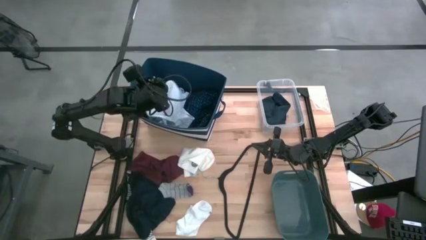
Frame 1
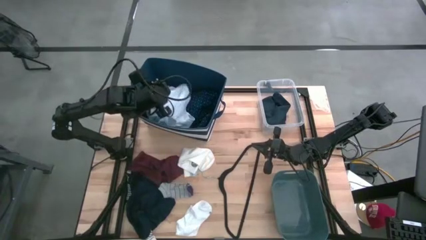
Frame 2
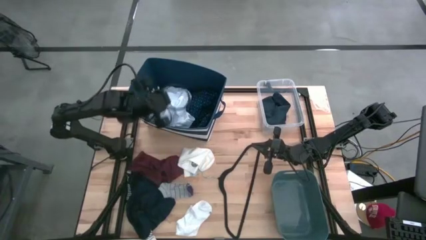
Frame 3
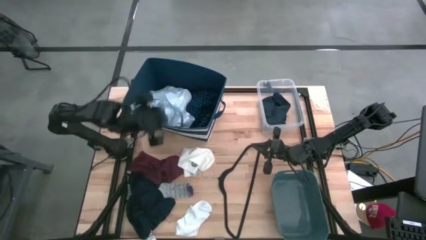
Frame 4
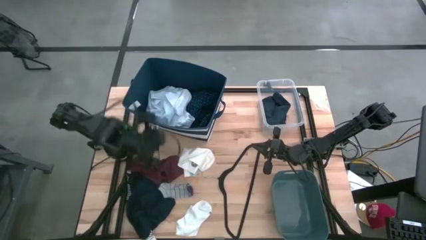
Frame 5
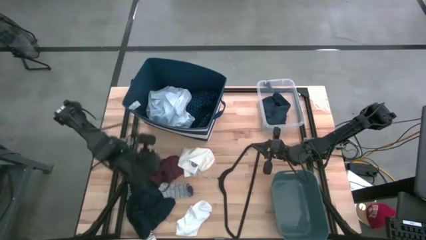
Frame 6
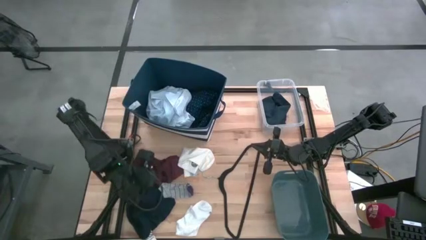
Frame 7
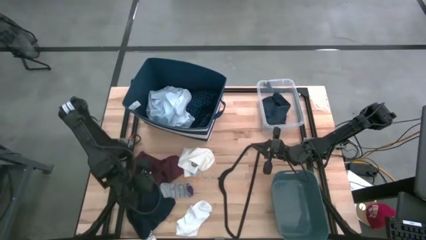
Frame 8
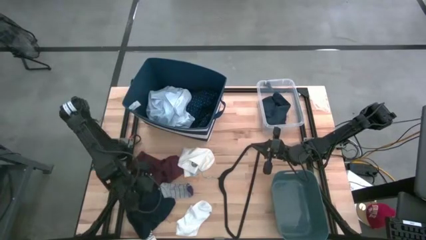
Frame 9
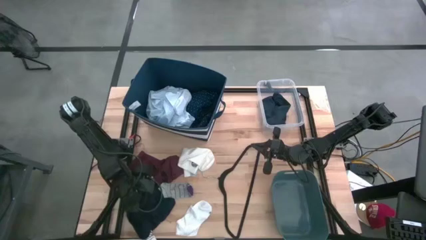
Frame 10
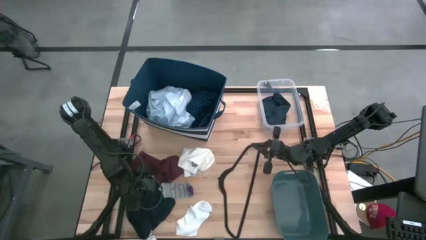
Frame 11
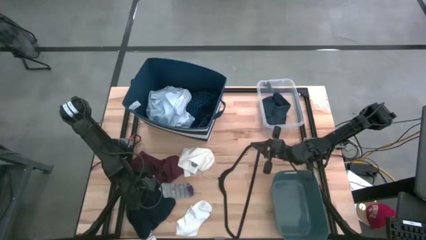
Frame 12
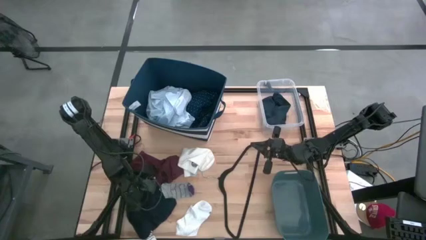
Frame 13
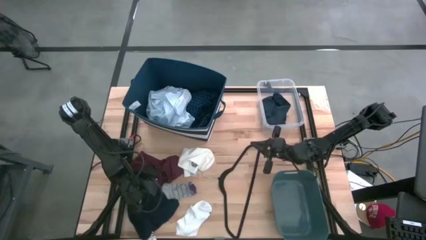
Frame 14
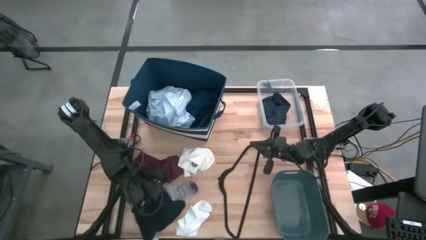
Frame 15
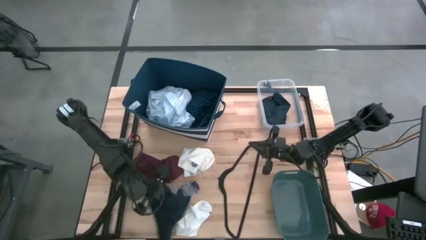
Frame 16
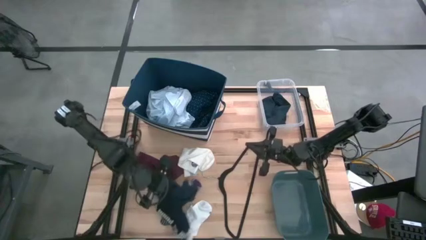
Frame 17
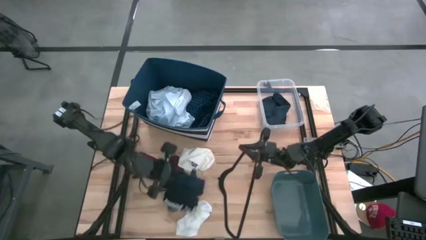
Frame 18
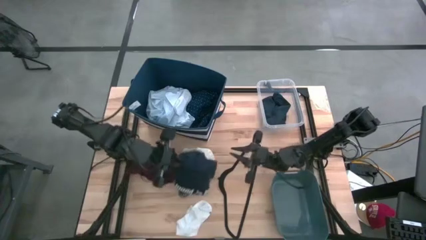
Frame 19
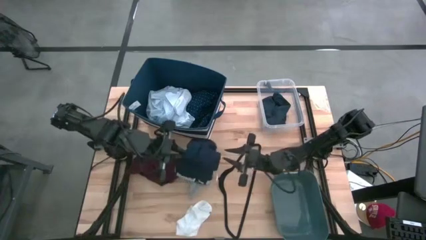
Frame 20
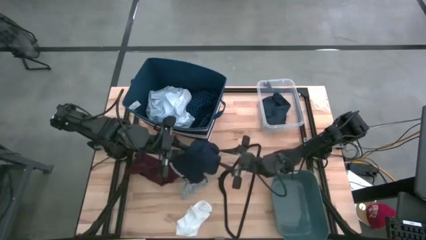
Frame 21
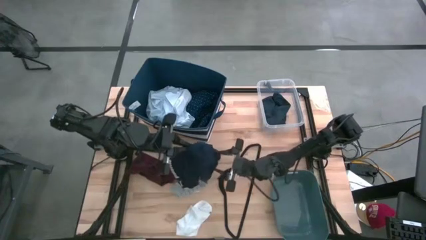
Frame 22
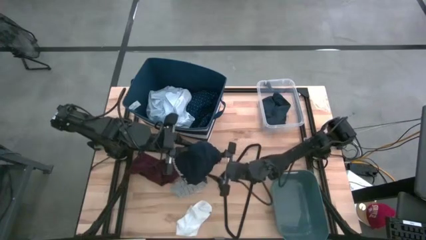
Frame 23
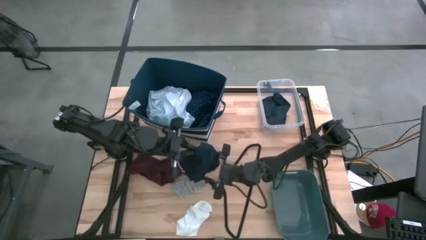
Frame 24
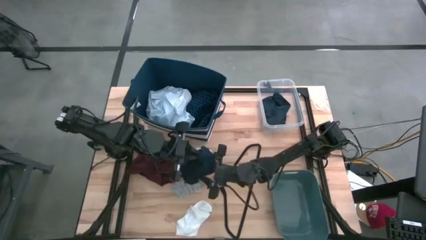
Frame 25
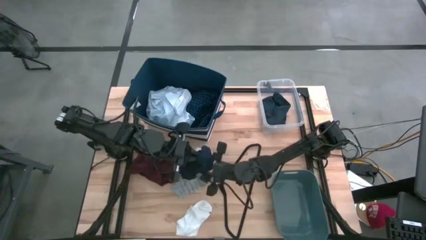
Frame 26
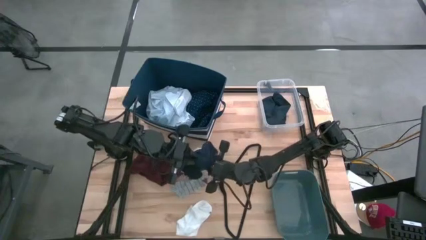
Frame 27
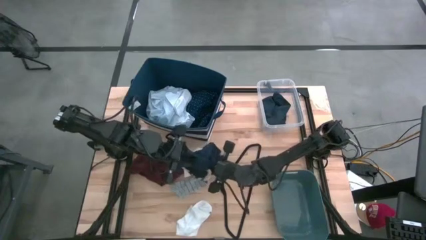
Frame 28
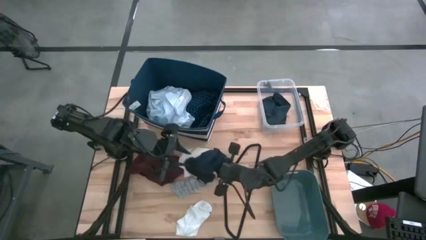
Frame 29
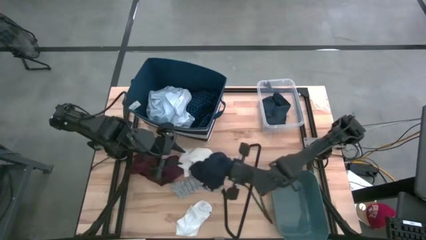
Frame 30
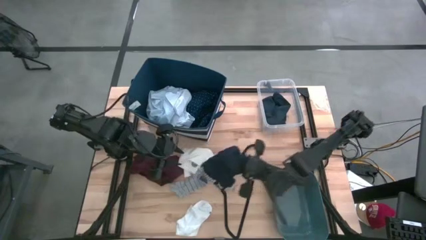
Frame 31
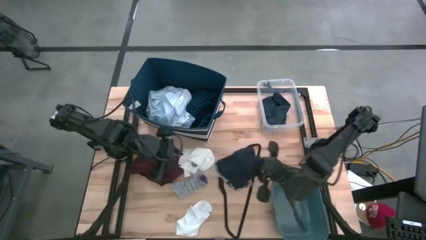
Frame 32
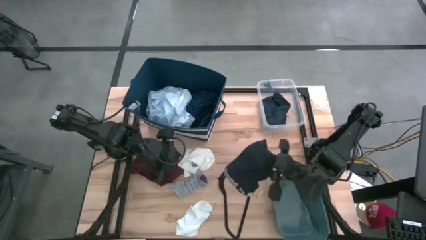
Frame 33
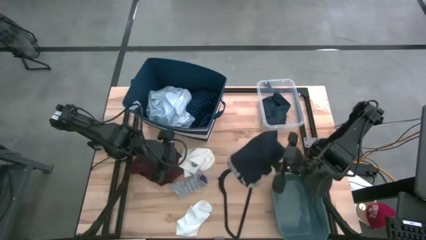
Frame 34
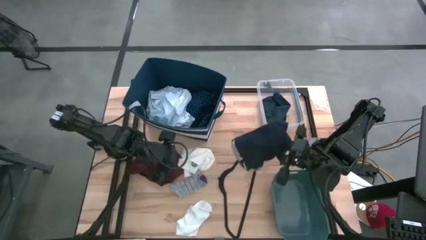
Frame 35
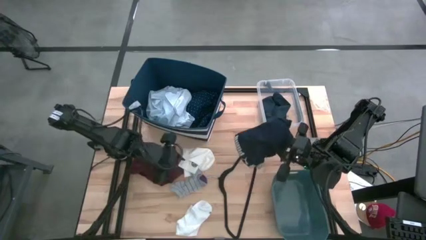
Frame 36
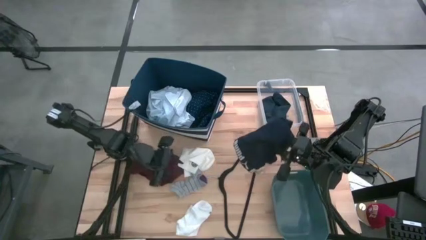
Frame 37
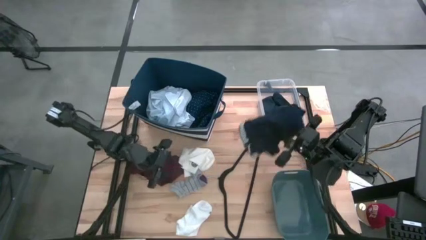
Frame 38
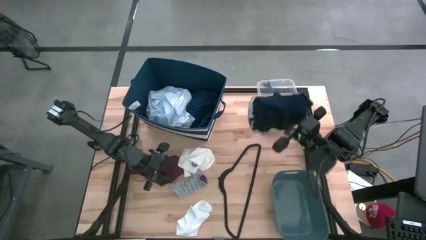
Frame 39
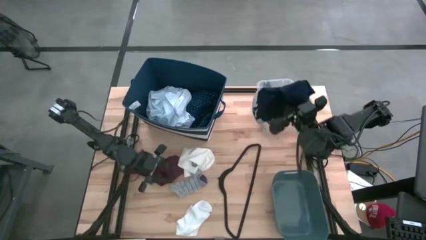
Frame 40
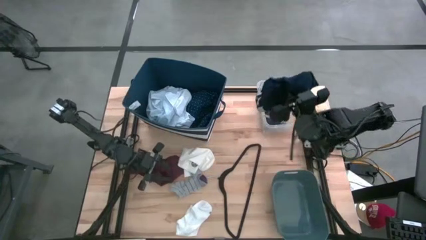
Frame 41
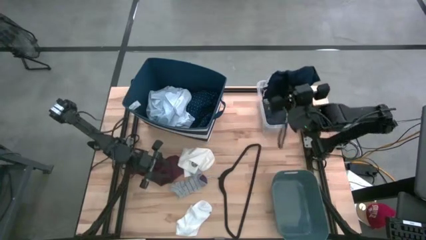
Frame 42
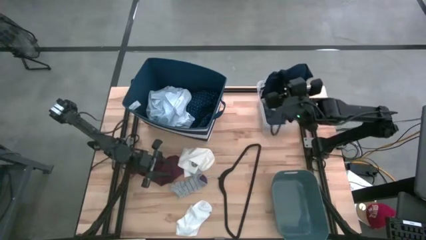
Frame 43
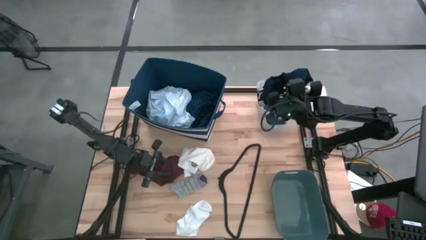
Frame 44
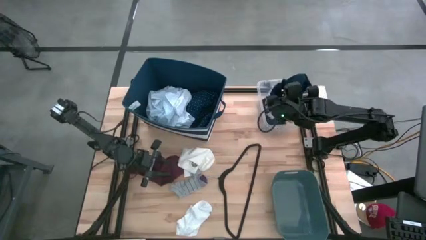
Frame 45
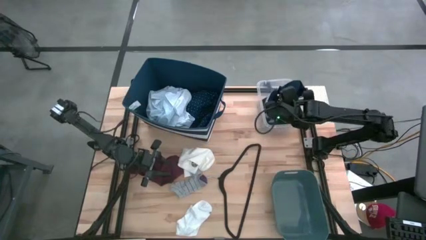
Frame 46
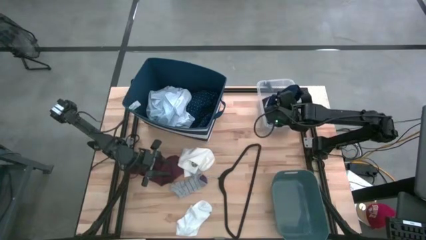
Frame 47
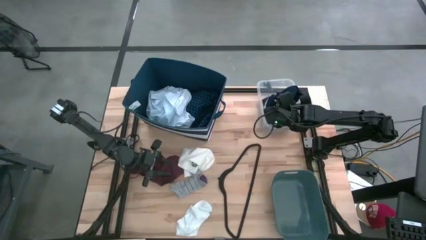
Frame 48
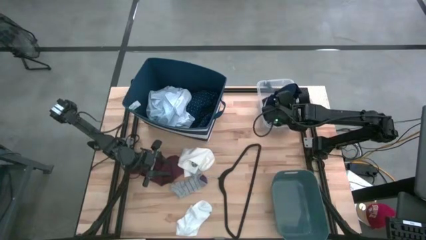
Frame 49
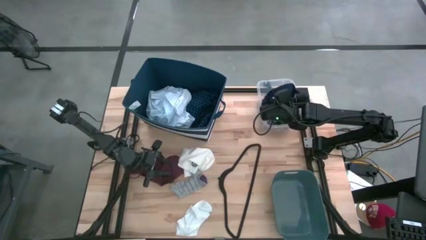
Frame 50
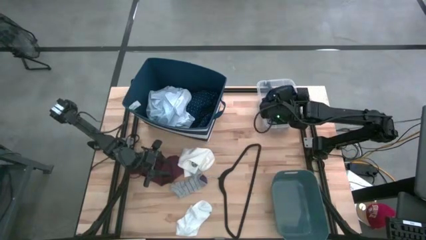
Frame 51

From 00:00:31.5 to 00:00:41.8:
Task: Pick & Place Cloths
Put the black boxer into the transparent bin

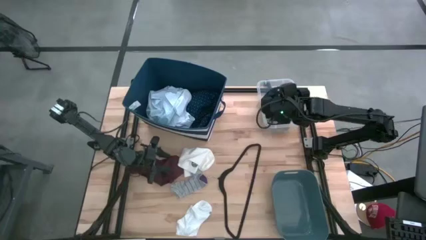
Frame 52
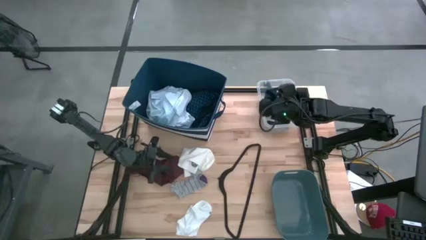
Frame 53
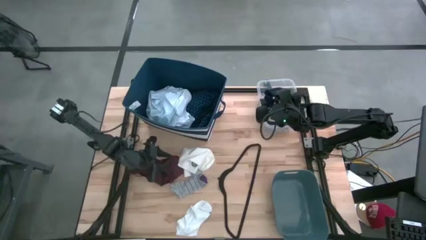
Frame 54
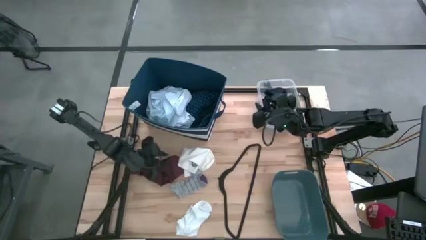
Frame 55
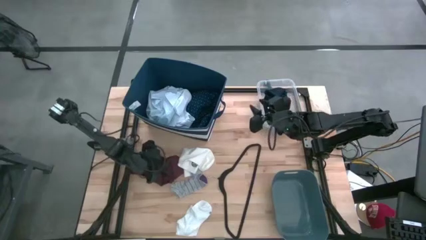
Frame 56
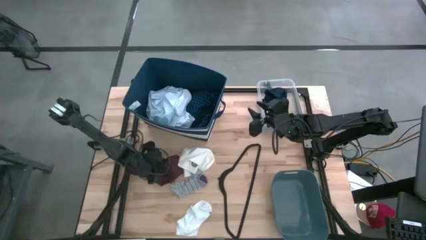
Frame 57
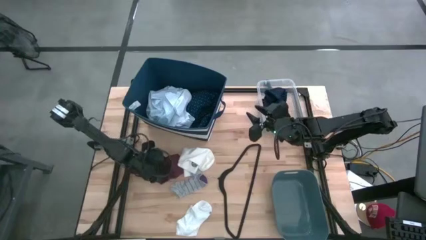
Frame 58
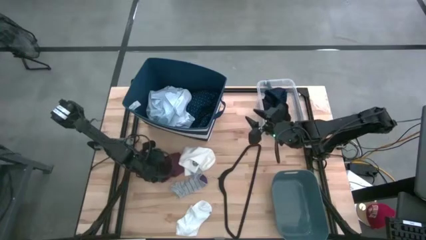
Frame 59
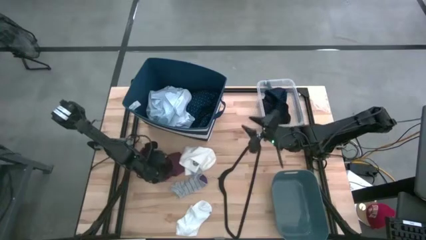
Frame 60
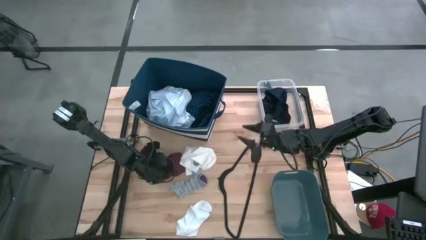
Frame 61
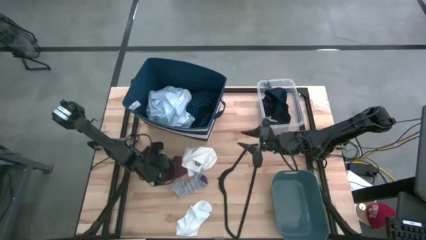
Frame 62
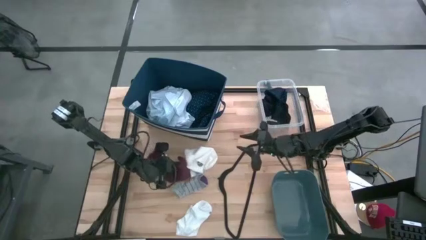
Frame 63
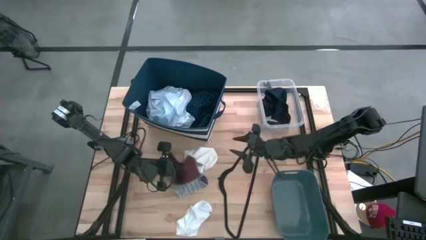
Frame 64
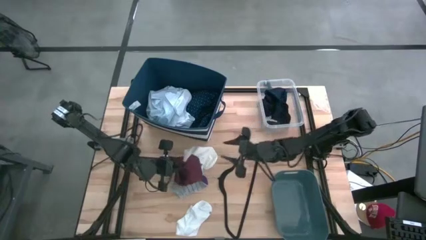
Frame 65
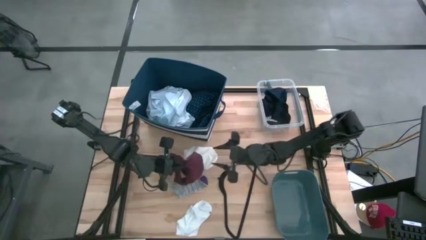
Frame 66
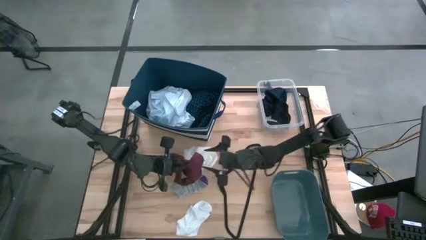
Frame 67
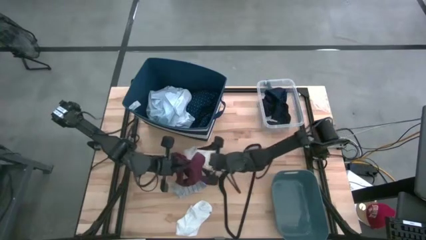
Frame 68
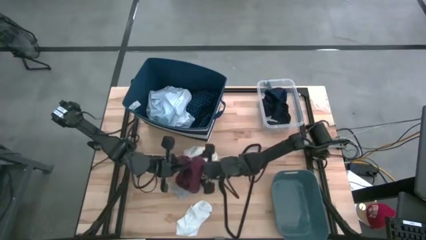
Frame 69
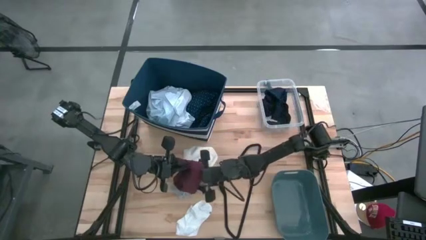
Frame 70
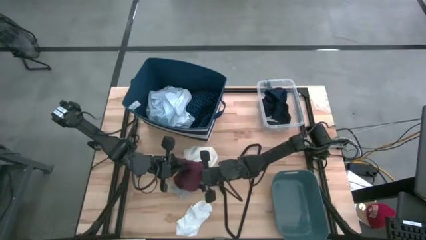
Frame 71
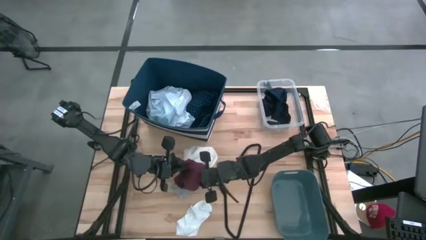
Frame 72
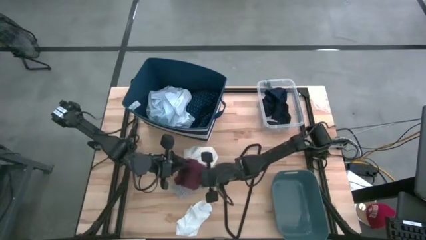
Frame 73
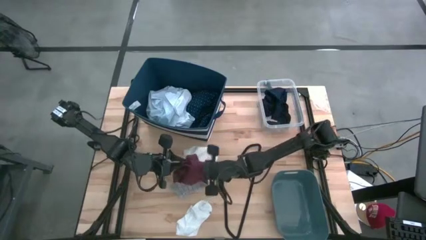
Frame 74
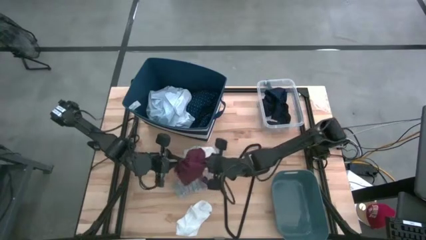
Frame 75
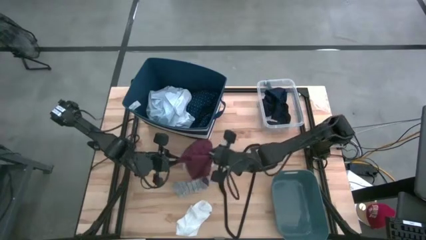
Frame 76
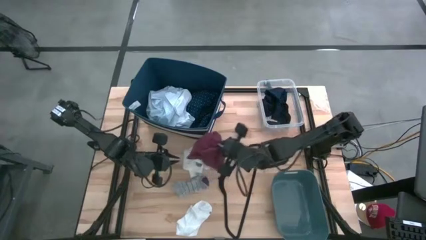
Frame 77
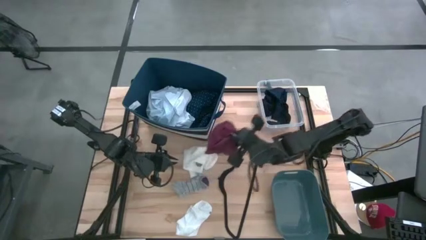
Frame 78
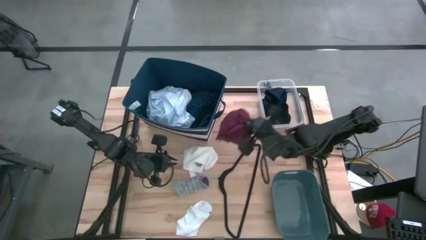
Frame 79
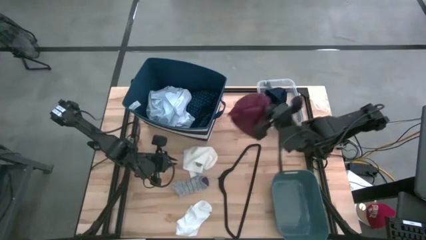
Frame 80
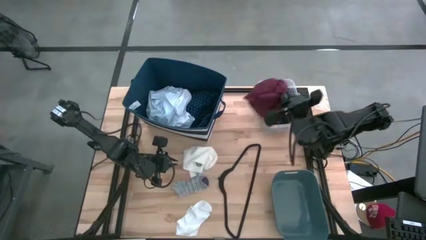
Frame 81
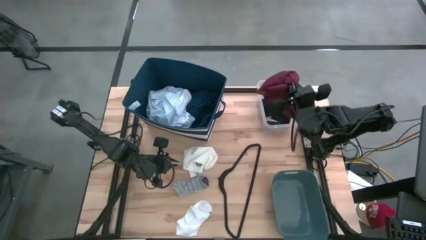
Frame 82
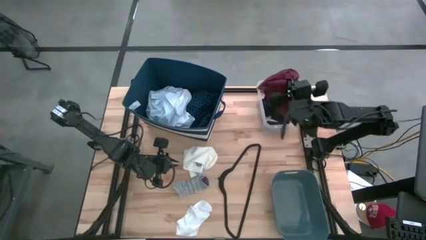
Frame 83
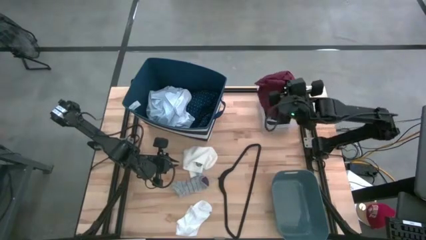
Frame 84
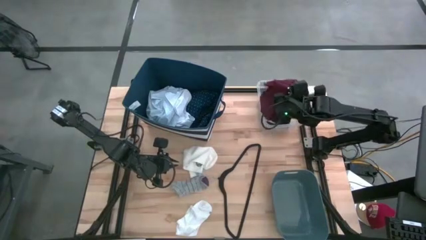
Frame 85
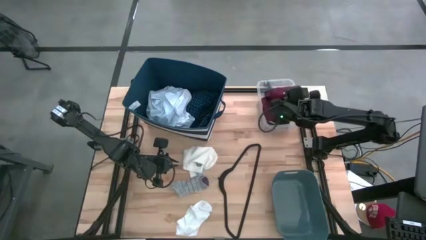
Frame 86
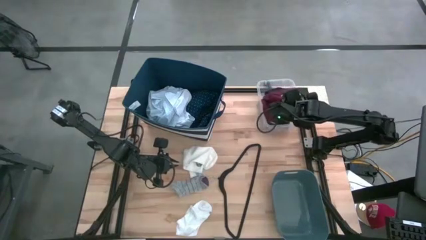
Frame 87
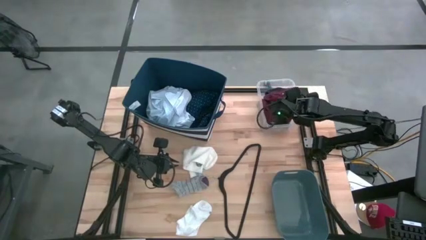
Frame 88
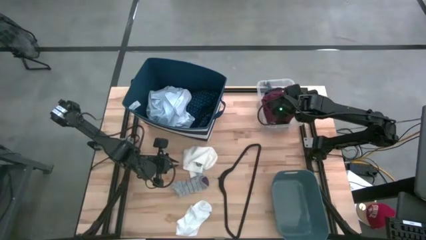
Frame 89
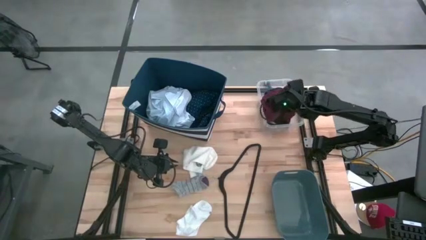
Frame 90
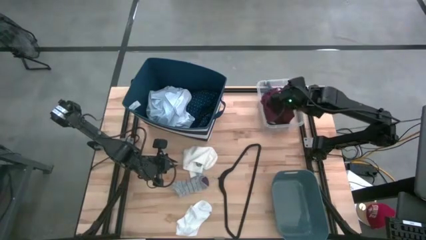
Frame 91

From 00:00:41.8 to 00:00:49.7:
Put the red underwear into the transparent bin
